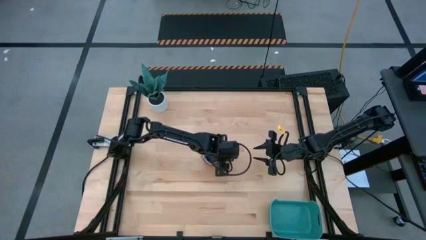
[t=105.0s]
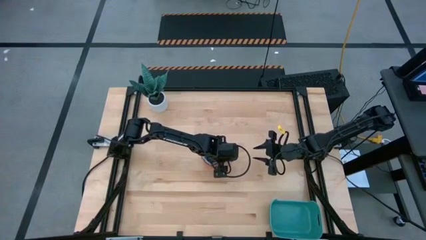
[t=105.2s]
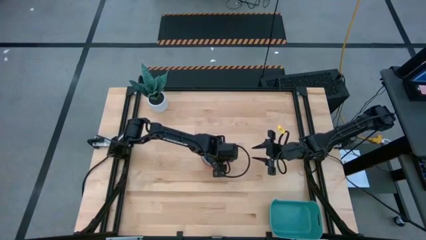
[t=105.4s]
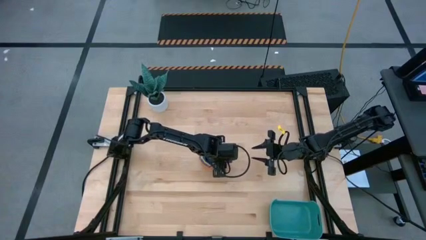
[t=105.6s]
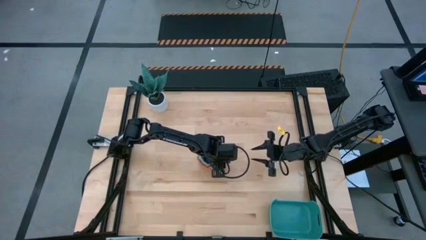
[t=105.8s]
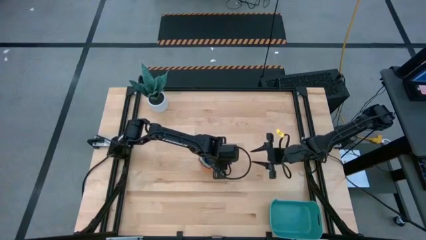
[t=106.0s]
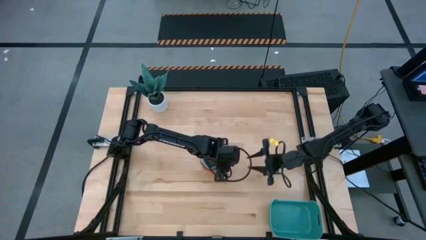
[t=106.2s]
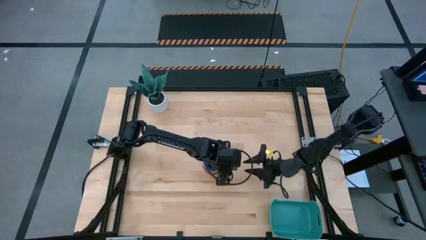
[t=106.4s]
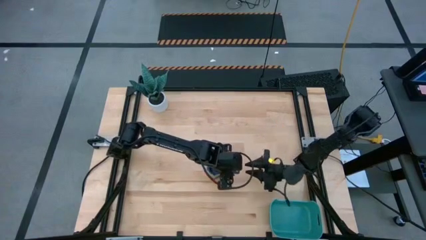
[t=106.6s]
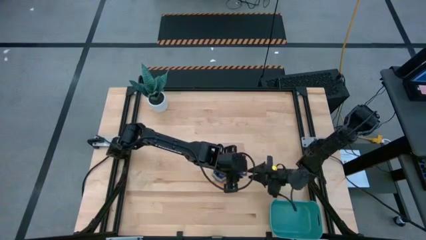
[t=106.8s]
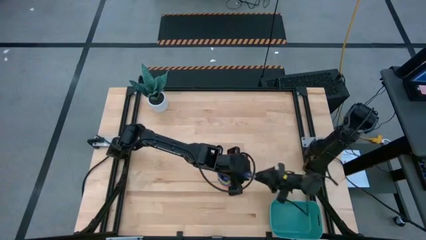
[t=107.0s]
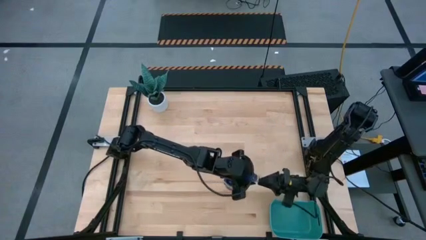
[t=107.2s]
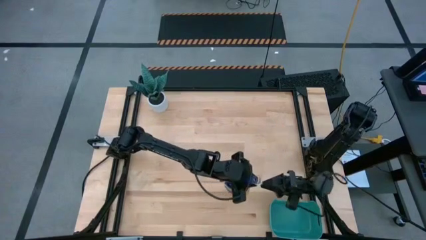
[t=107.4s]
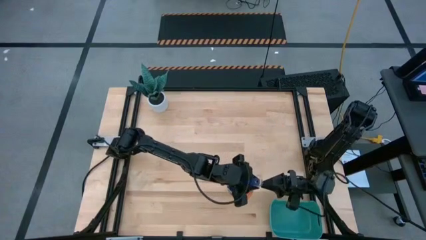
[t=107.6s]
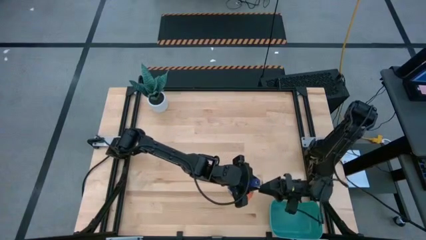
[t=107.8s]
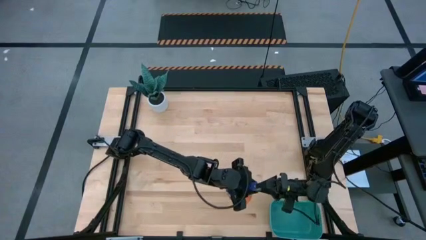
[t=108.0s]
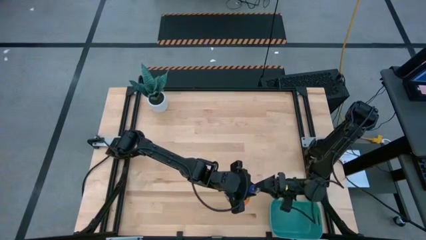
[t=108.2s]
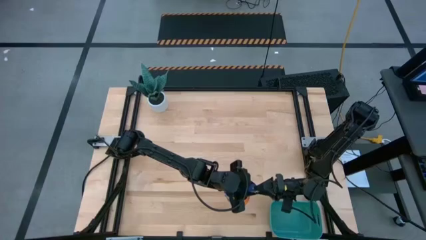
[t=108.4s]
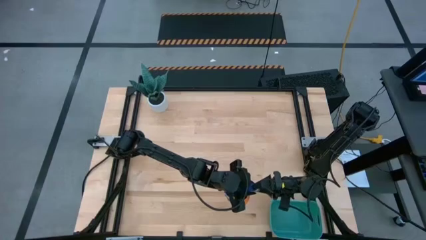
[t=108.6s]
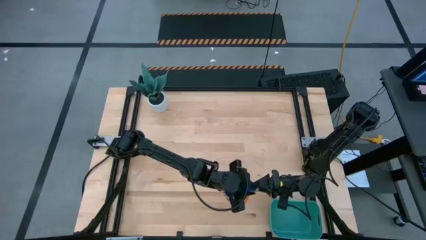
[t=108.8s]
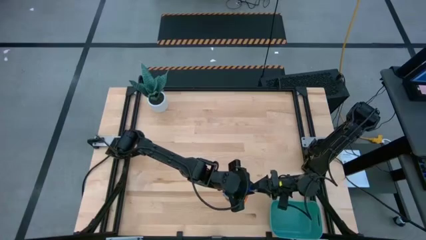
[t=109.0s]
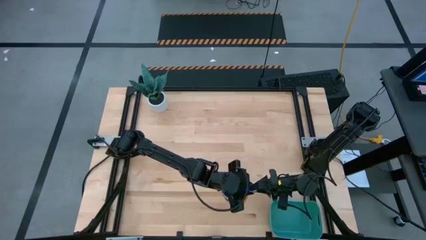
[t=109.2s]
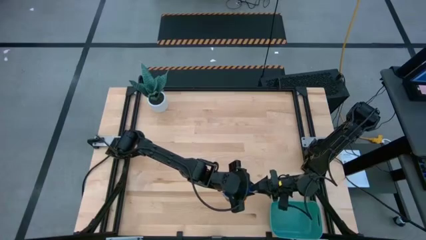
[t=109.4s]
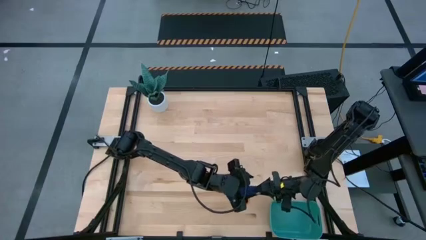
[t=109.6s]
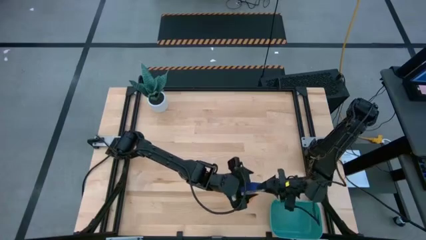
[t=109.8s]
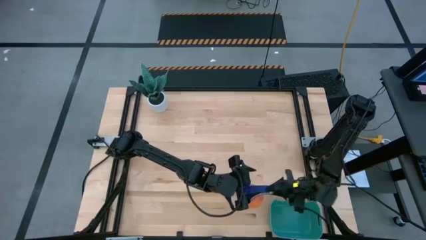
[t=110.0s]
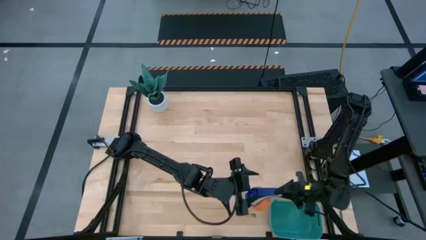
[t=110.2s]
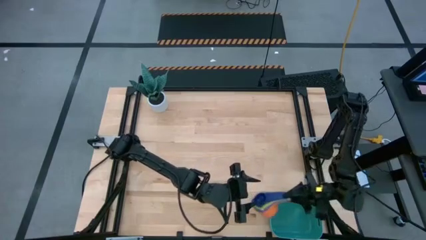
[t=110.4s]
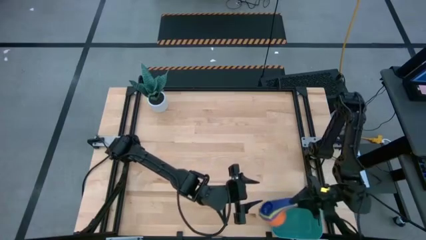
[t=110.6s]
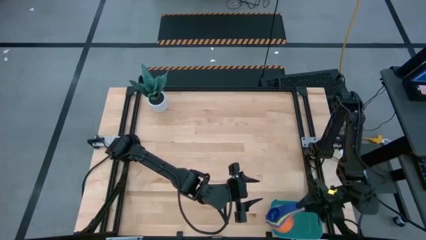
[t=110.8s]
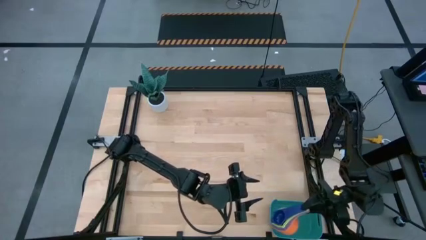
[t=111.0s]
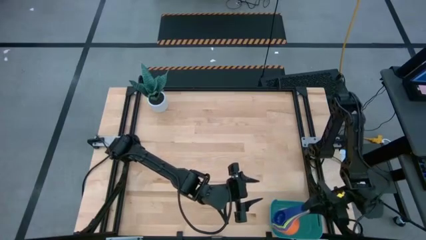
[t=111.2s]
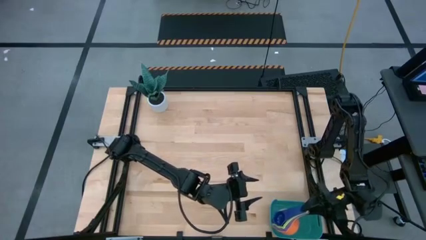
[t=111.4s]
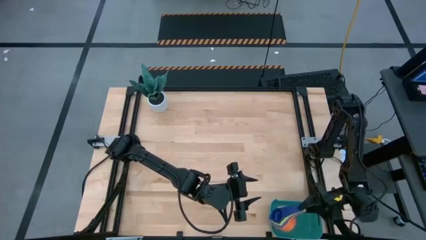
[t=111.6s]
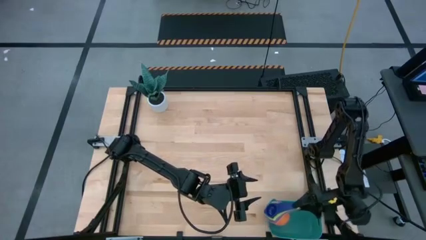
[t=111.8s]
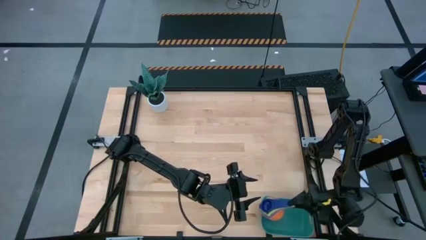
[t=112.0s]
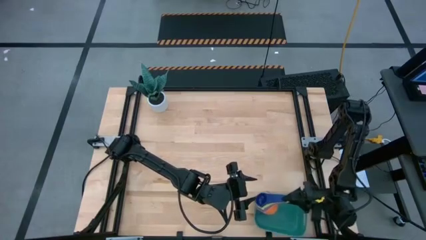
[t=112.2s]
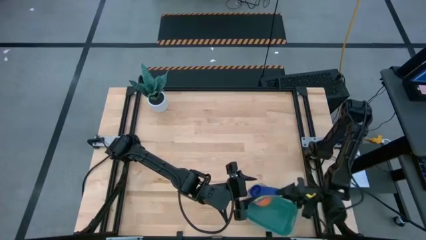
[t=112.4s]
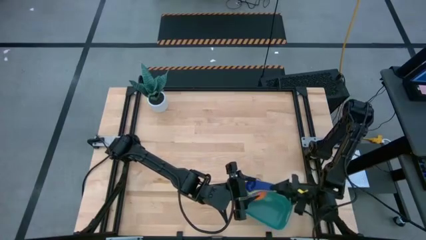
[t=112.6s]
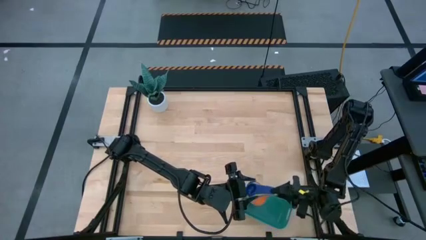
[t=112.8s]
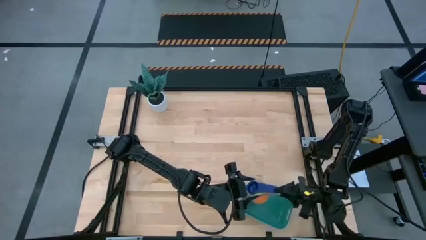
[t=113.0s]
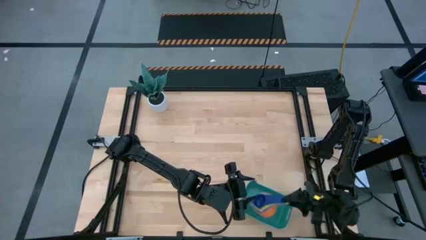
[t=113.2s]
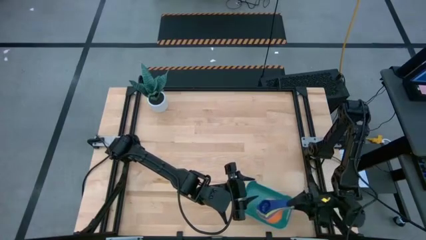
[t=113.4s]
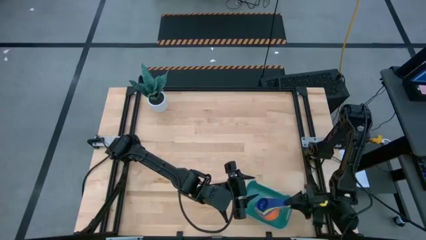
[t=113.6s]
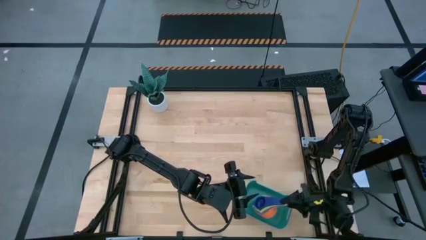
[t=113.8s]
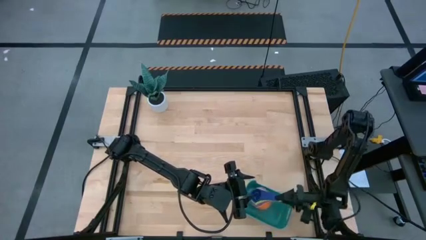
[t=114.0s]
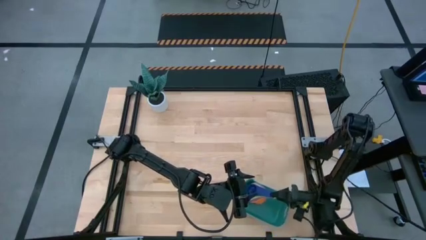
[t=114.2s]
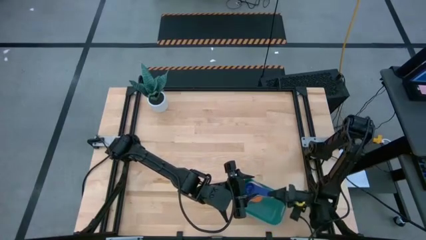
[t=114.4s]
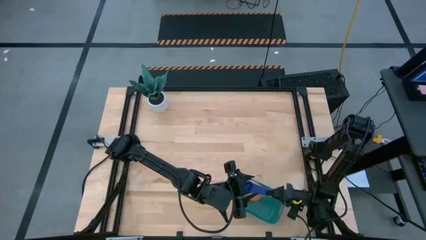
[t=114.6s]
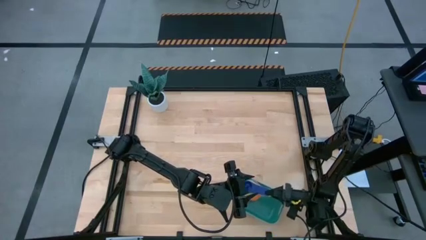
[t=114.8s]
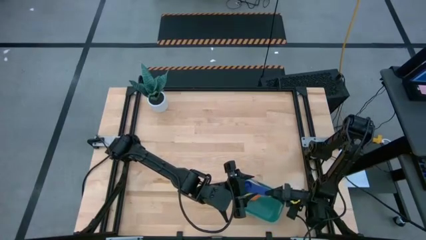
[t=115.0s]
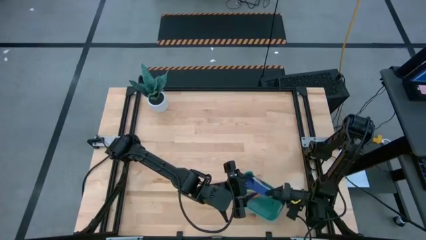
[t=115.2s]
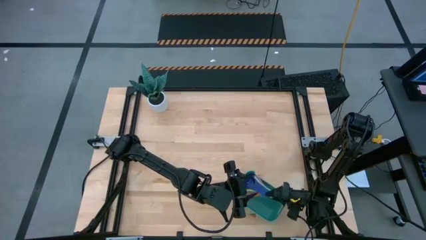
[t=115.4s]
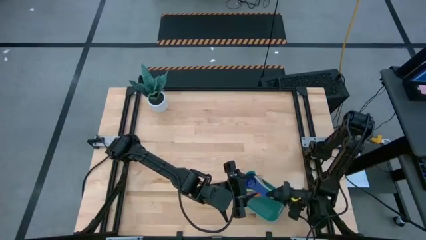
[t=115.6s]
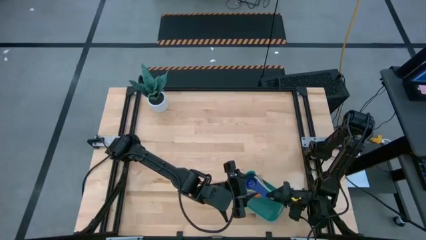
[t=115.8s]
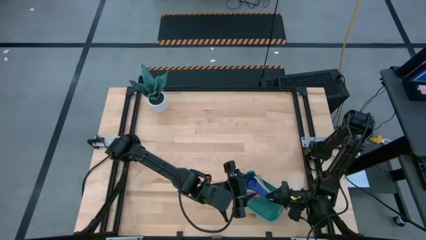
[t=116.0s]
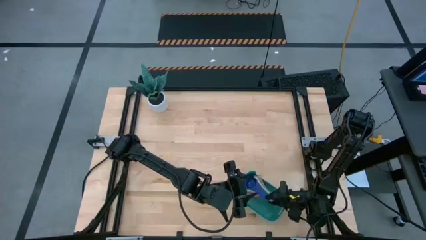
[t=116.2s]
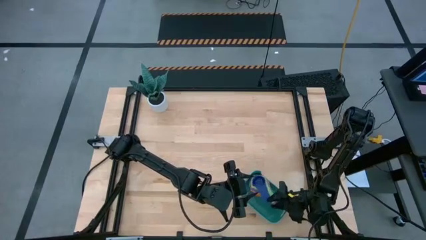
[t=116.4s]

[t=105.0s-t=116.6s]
Task: Nest measuring cups in basket
Put the stacked measuring cups into the blue bin

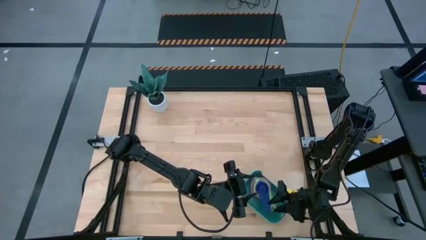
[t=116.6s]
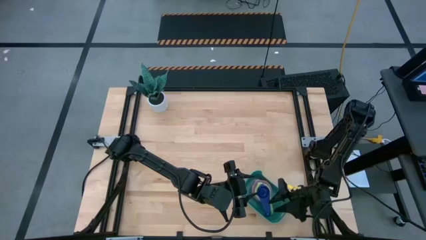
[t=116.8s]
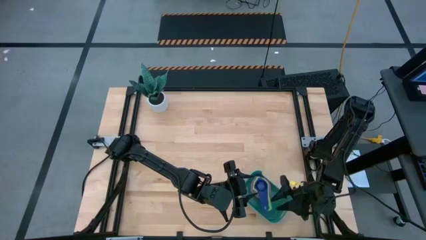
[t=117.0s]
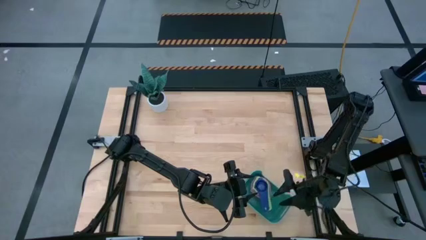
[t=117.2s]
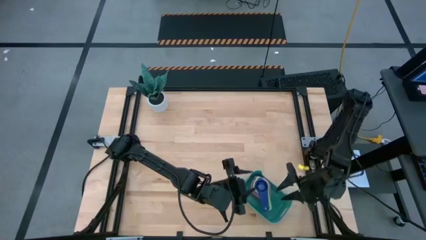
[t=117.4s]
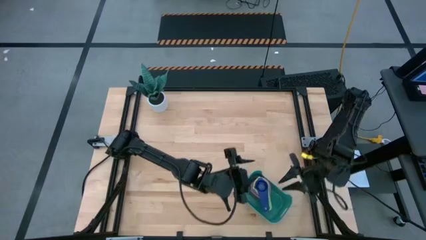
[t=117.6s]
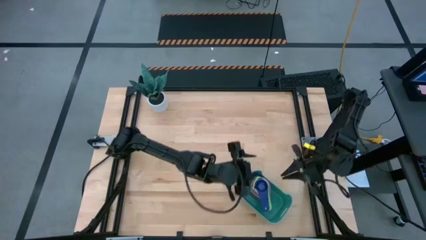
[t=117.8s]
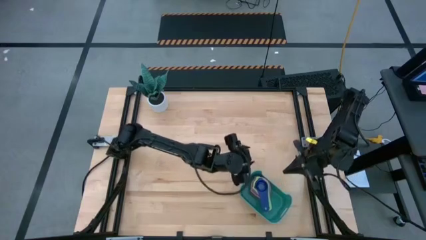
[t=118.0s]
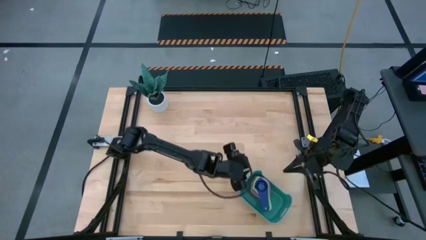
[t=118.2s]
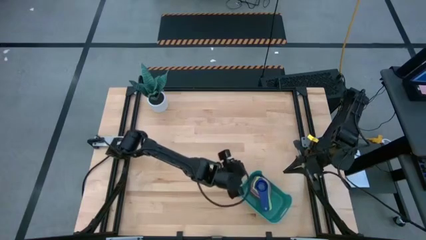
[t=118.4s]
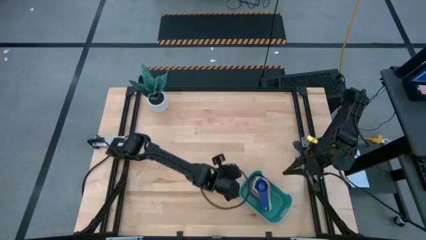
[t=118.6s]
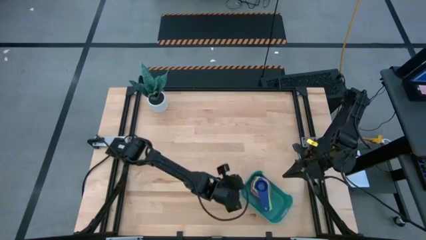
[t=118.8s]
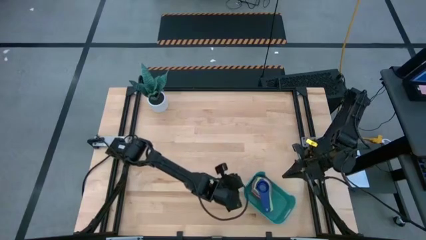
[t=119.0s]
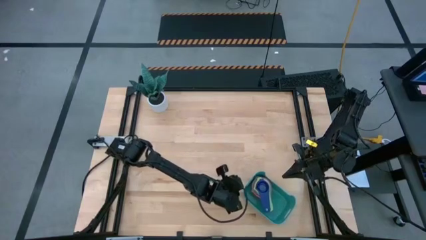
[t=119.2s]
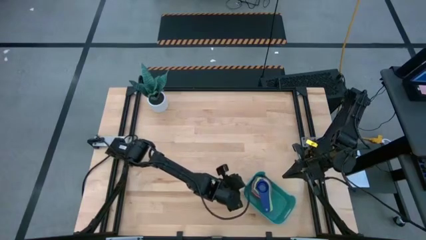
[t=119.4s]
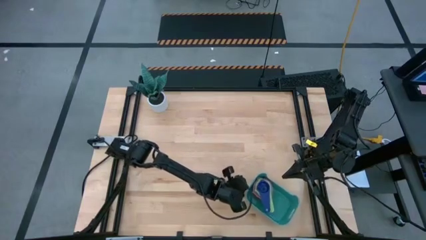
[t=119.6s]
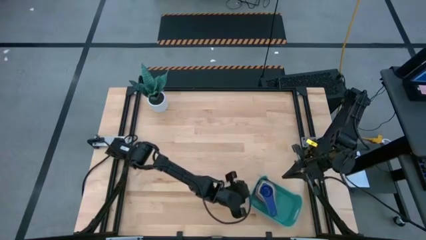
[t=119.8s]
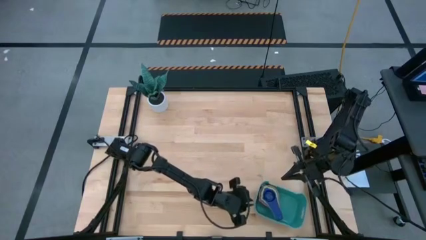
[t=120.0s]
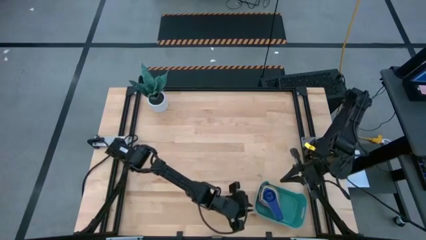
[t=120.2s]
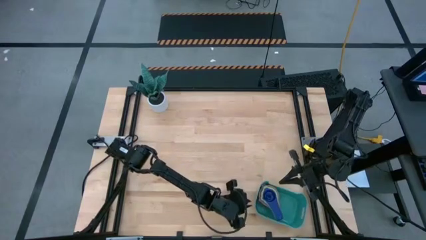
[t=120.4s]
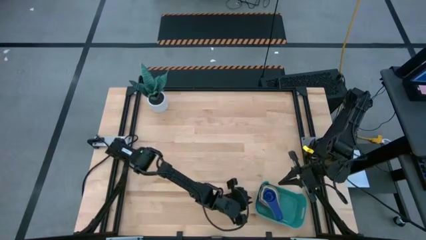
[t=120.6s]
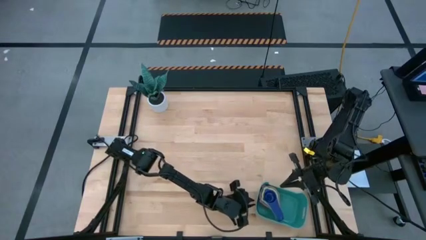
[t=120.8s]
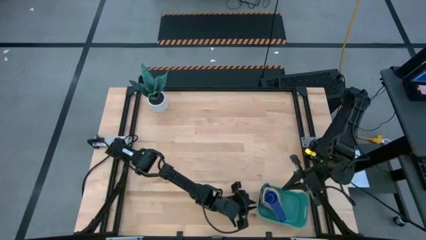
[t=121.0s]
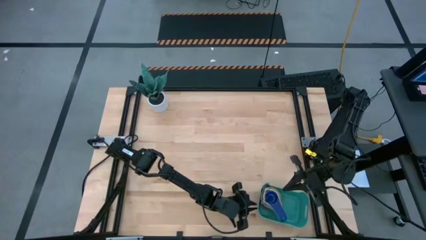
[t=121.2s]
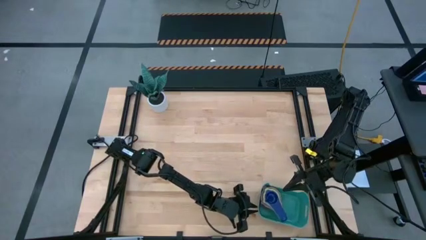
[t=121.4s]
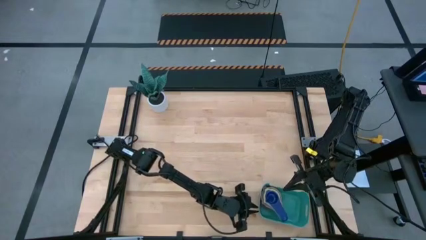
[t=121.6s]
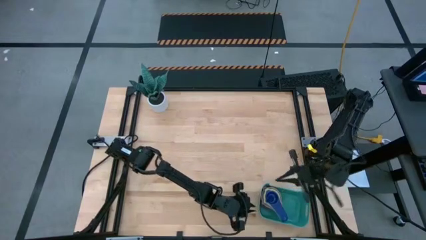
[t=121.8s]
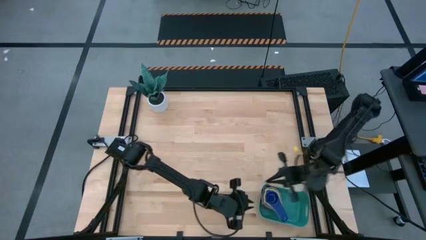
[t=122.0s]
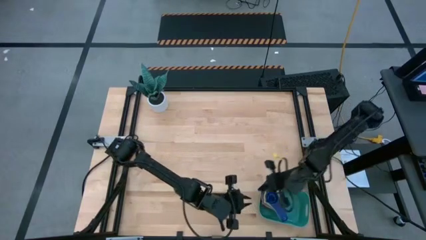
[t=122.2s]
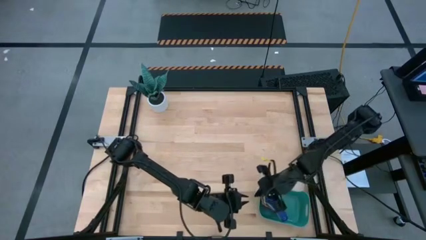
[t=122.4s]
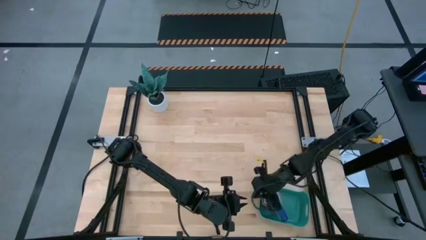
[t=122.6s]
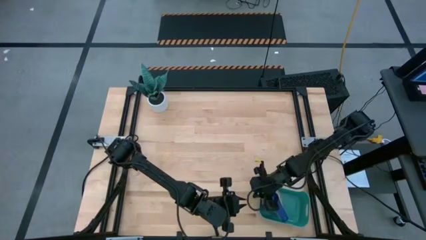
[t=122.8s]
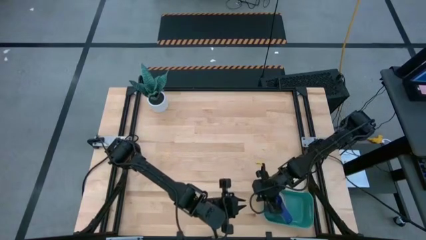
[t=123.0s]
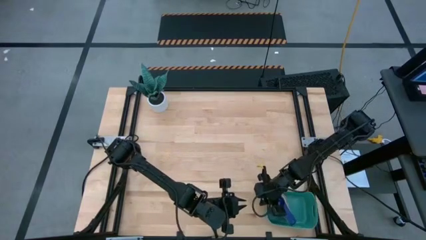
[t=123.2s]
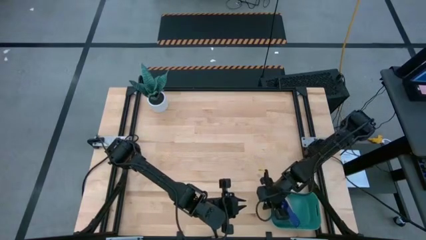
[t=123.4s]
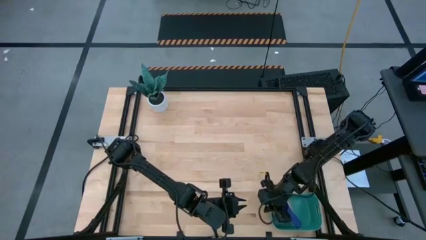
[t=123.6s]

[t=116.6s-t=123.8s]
Adjust the blue bin
